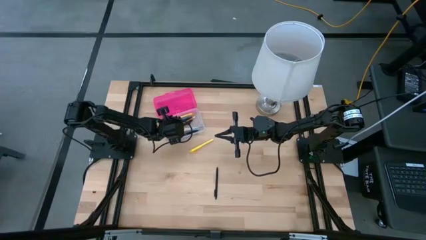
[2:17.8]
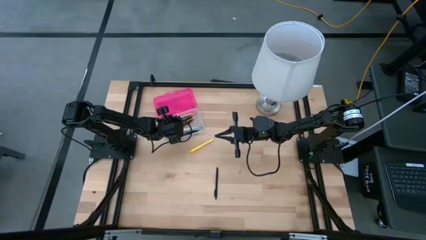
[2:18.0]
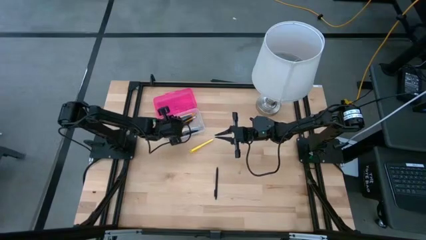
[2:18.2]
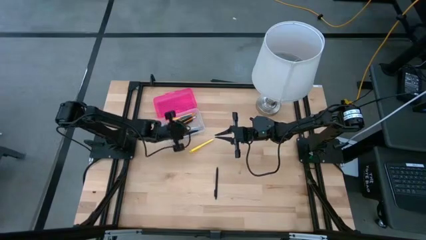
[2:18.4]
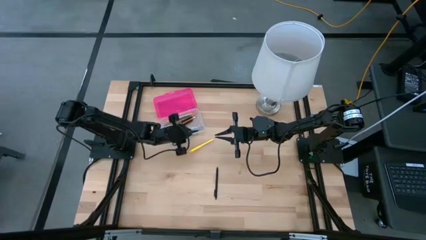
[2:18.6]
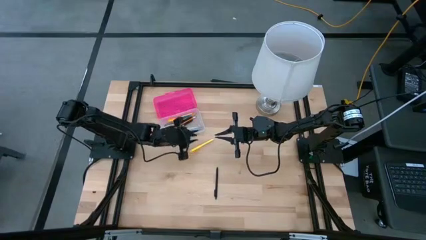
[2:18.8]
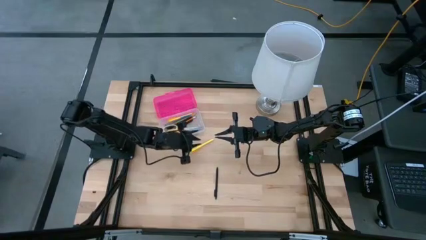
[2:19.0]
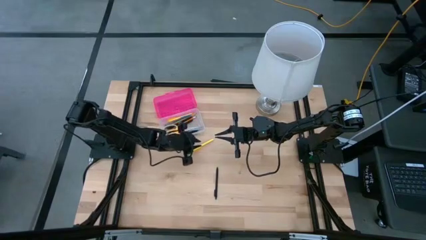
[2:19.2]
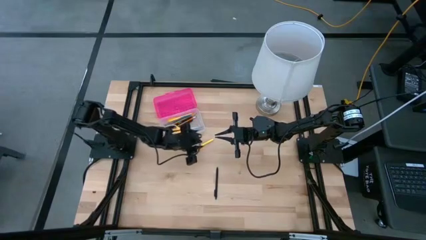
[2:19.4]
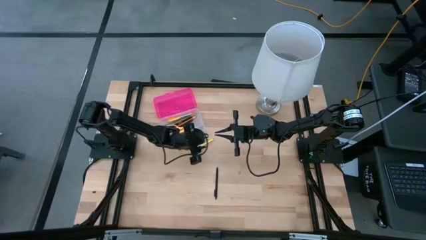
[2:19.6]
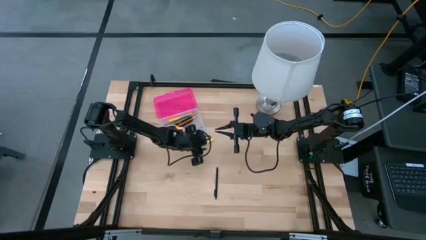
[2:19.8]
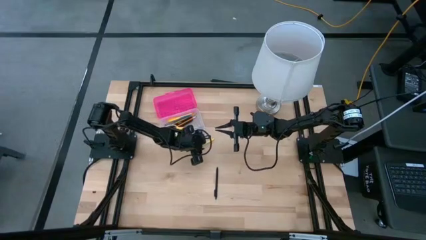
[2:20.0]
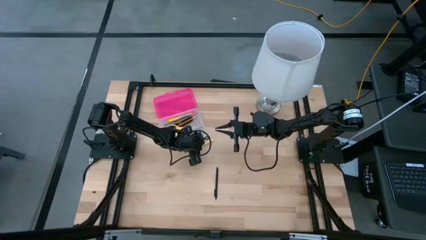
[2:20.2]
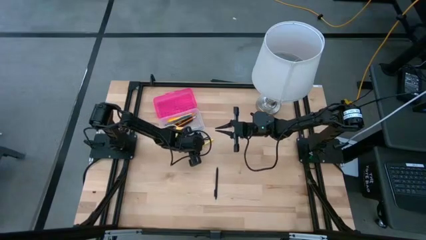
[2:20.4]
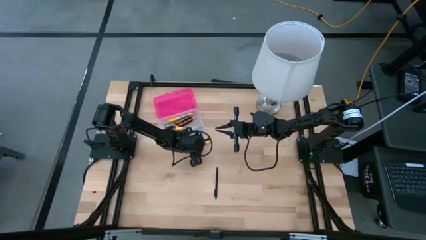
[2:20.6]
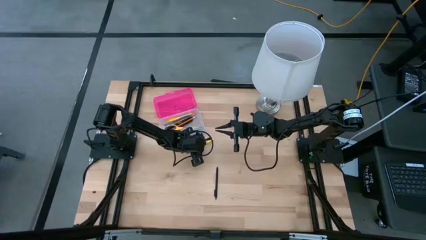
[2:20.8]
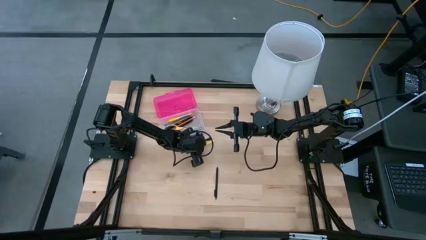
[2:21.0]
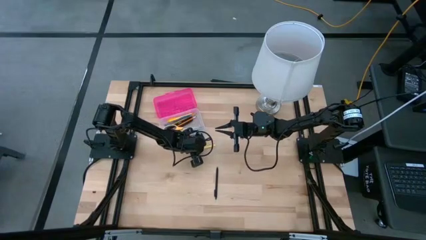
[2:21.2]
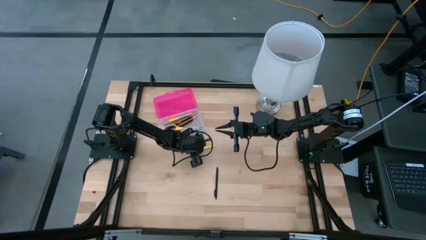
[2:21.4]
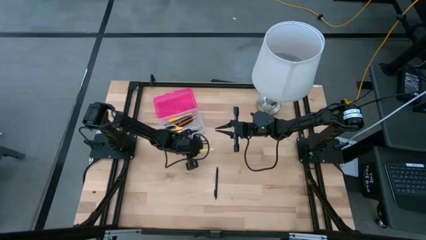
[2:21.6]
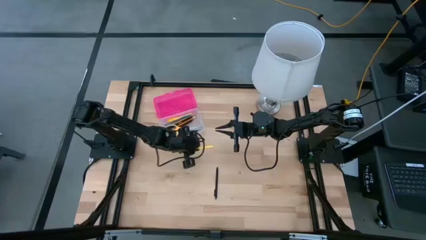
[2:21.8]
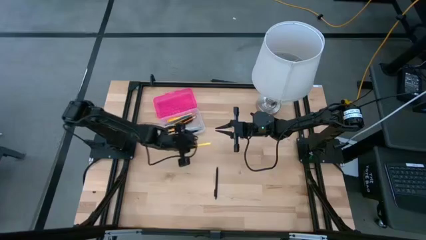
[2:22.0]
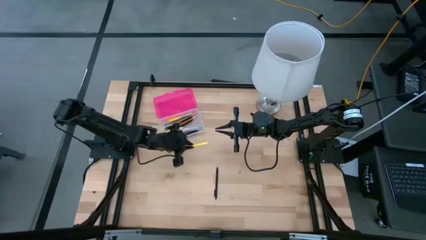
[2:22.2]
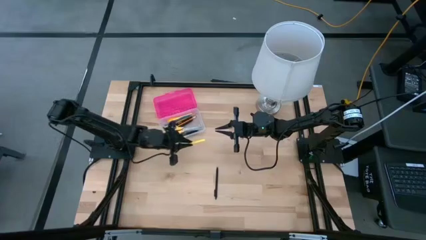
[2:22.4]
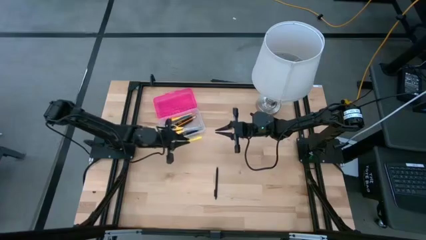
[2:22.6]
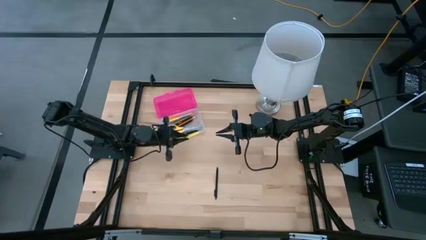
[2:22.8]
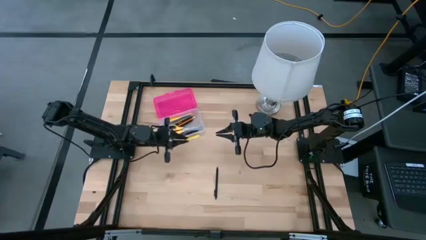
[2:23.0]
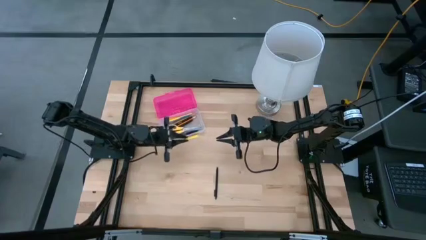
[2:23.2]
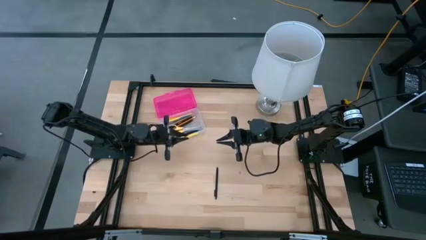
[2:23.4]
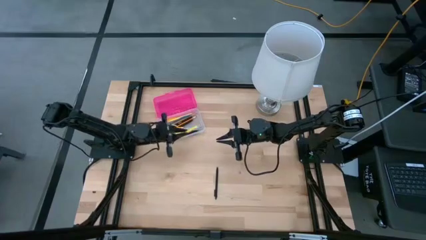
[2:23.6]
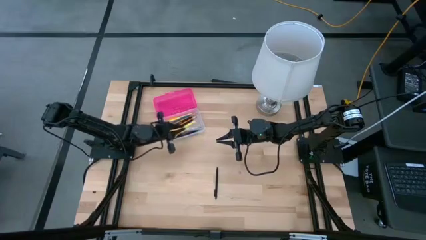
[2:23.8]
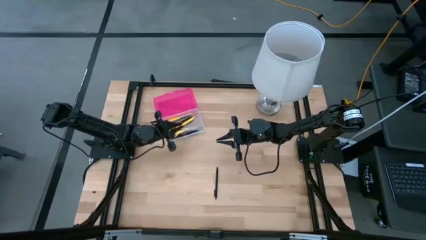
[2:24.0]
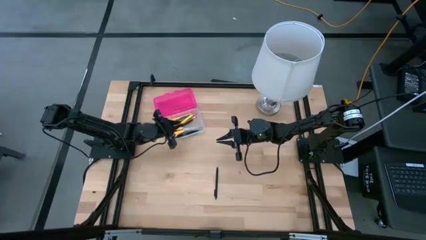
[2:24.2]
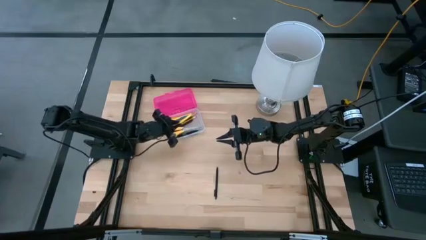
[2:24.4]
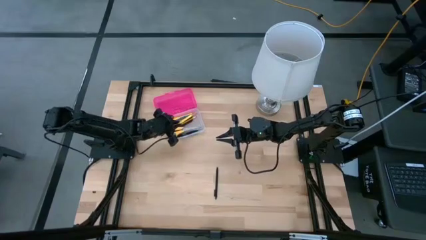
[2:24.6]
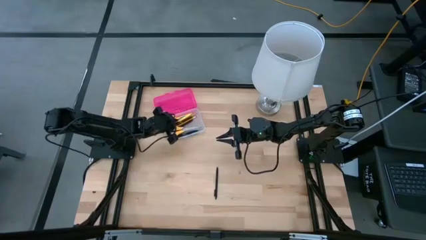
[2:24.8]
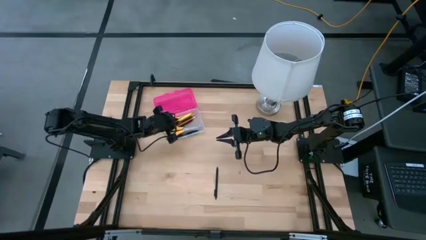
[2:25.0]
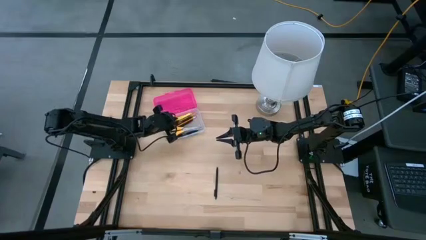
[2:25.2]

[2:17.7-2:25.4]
Task: Pick & place school supplies into a supply box
Put the yellow pen into the pink supply box

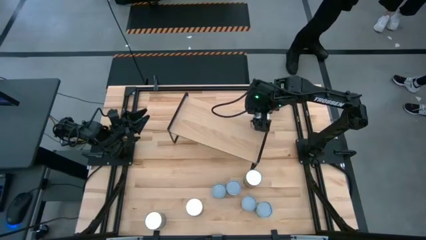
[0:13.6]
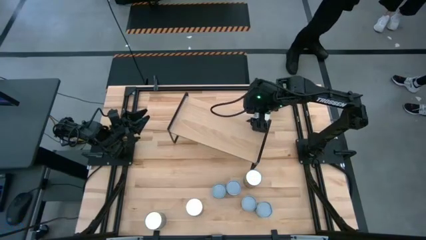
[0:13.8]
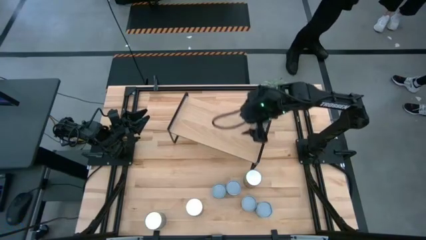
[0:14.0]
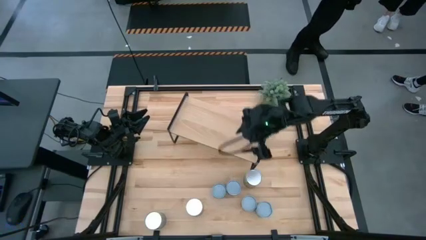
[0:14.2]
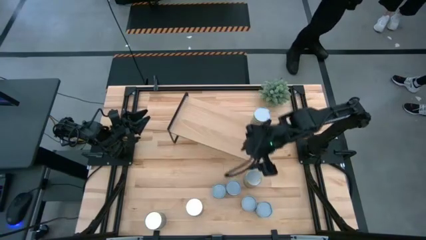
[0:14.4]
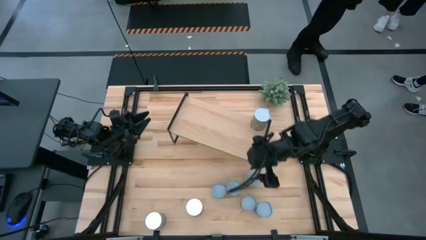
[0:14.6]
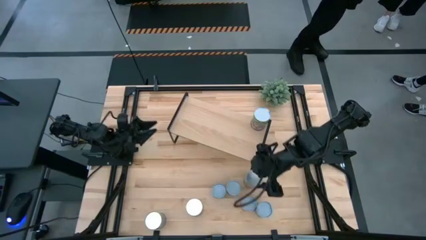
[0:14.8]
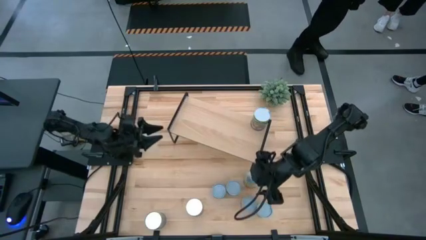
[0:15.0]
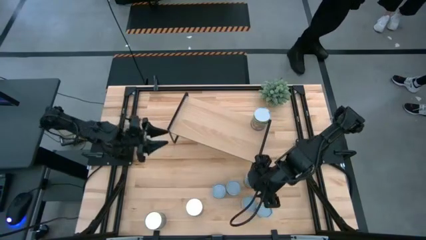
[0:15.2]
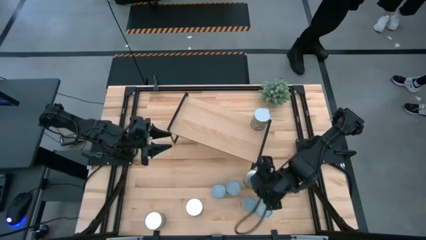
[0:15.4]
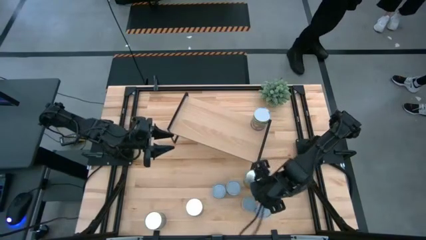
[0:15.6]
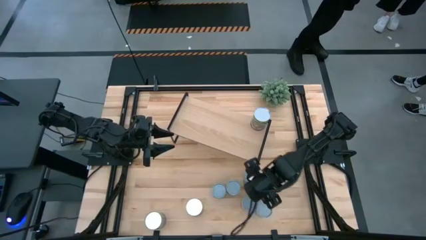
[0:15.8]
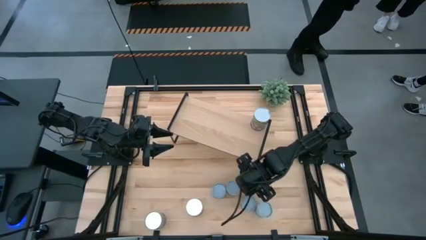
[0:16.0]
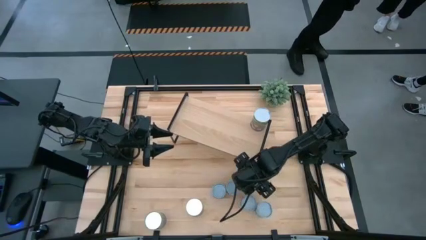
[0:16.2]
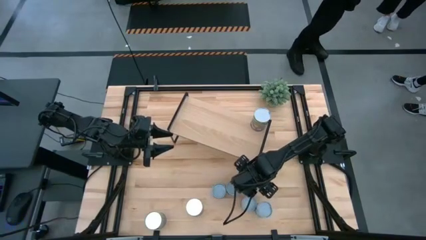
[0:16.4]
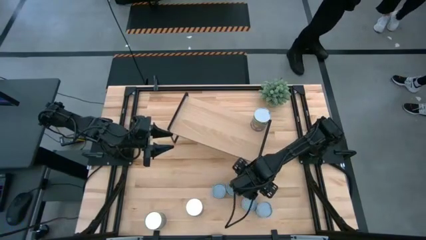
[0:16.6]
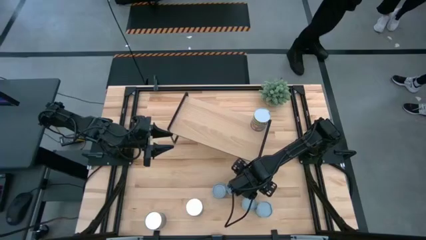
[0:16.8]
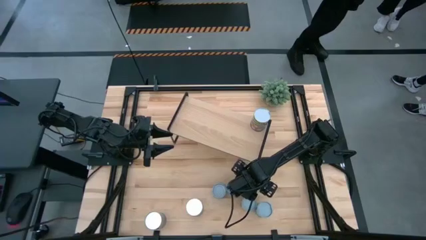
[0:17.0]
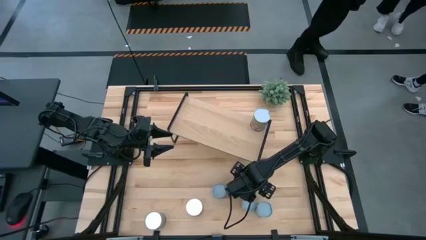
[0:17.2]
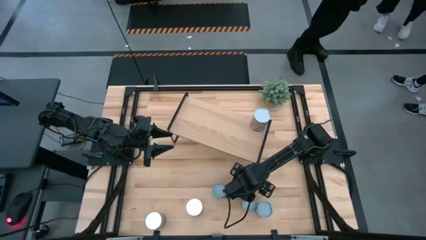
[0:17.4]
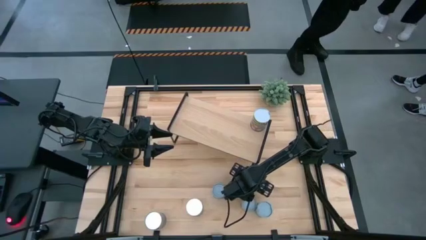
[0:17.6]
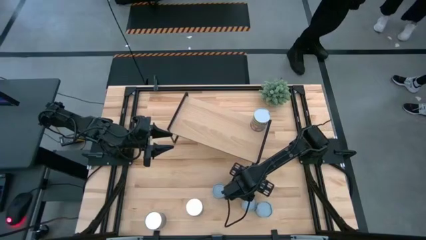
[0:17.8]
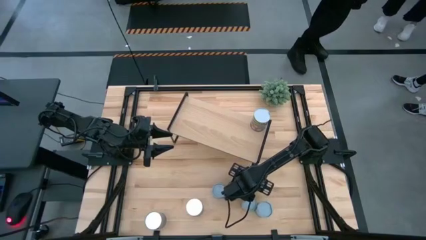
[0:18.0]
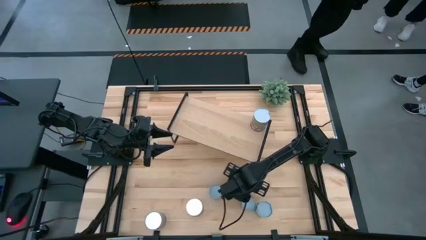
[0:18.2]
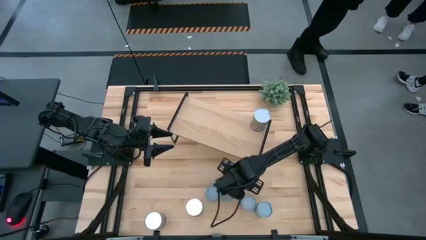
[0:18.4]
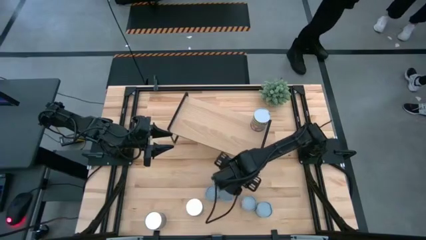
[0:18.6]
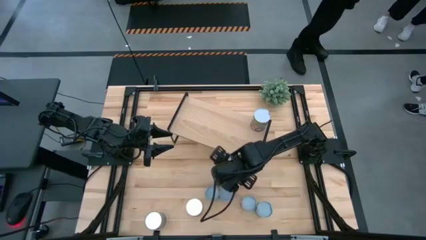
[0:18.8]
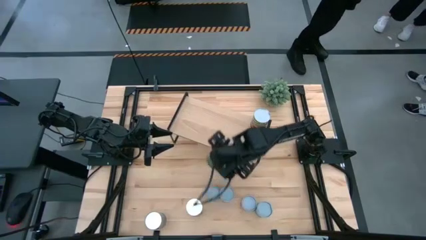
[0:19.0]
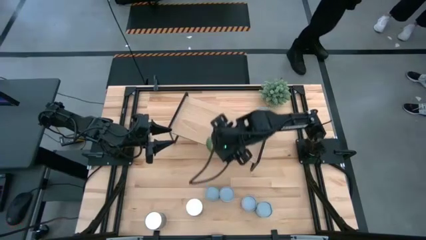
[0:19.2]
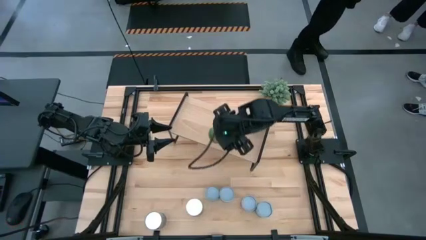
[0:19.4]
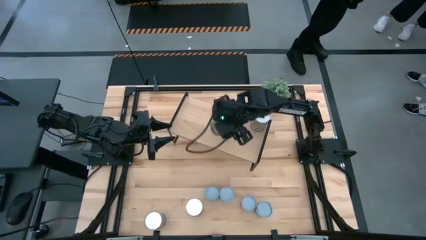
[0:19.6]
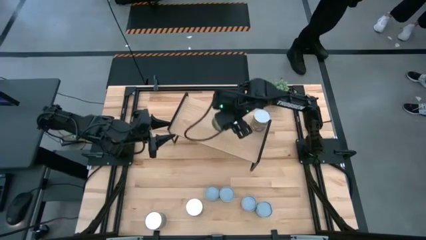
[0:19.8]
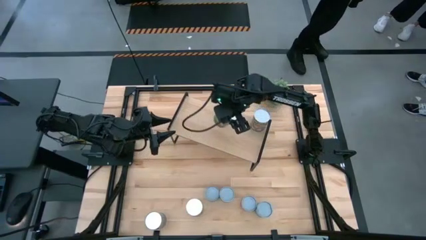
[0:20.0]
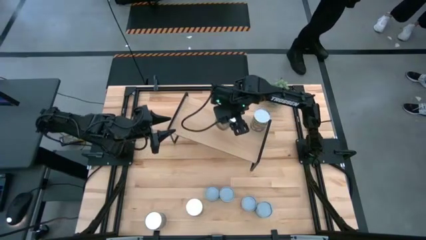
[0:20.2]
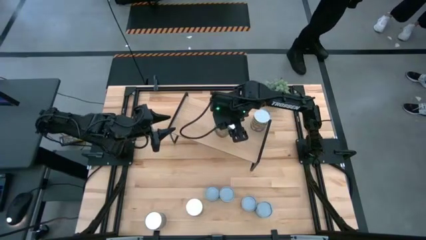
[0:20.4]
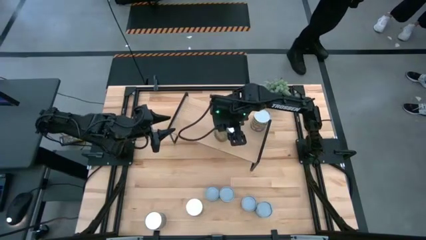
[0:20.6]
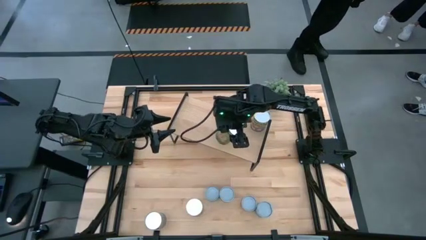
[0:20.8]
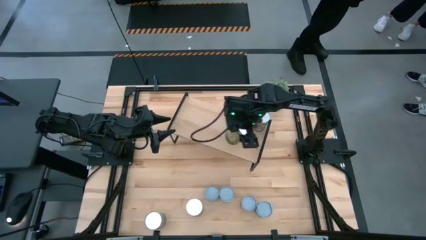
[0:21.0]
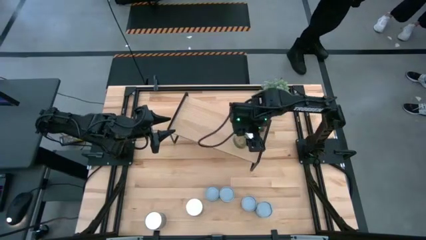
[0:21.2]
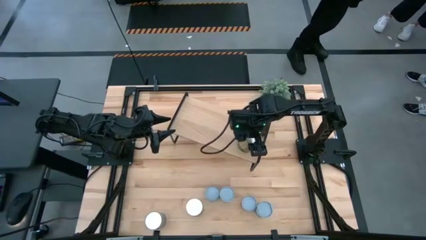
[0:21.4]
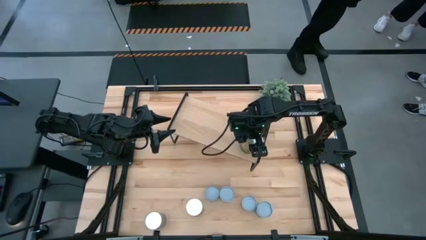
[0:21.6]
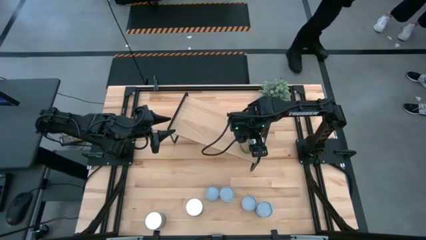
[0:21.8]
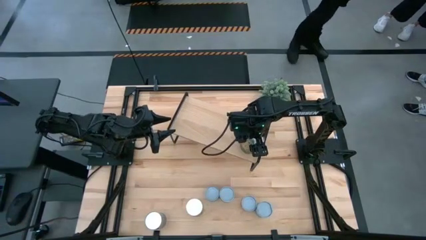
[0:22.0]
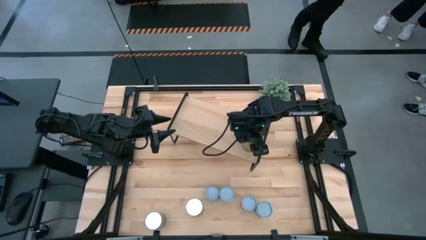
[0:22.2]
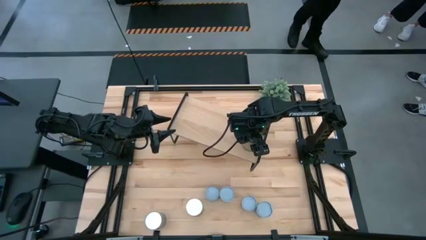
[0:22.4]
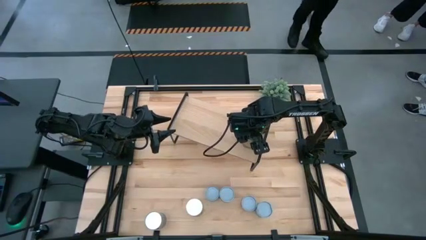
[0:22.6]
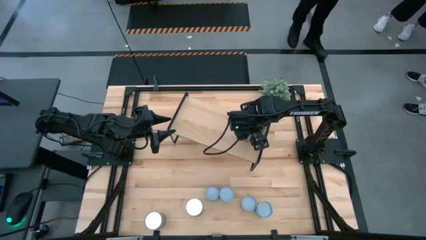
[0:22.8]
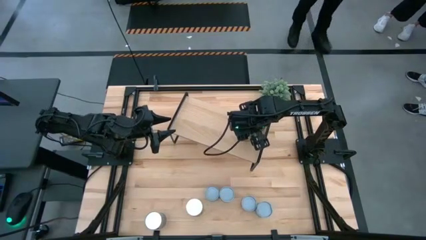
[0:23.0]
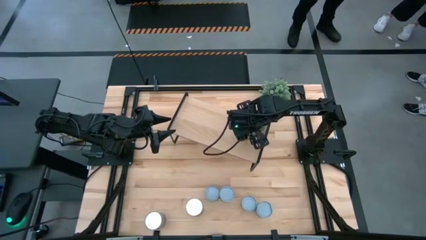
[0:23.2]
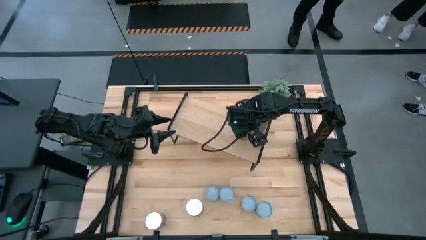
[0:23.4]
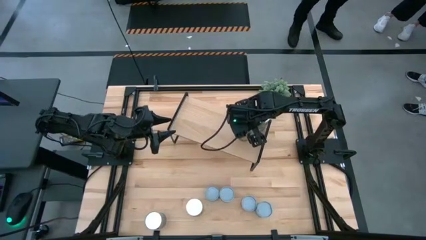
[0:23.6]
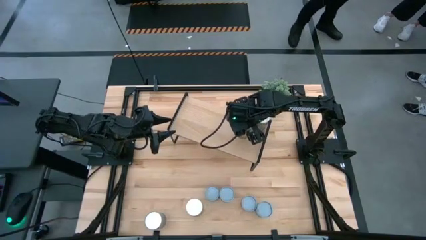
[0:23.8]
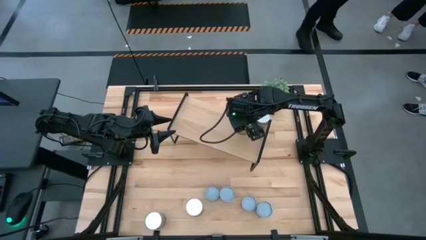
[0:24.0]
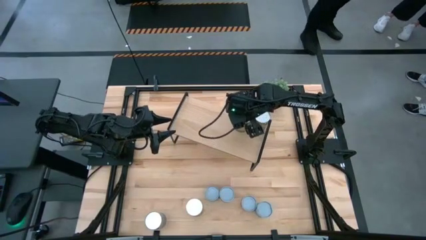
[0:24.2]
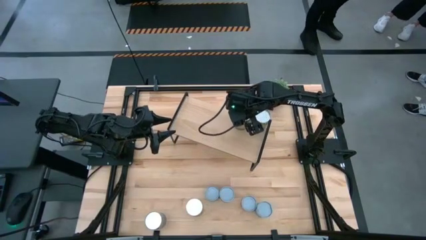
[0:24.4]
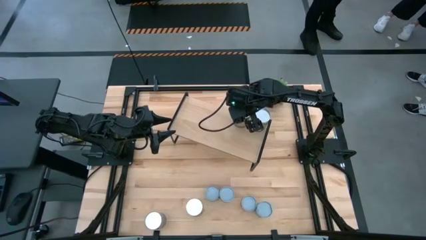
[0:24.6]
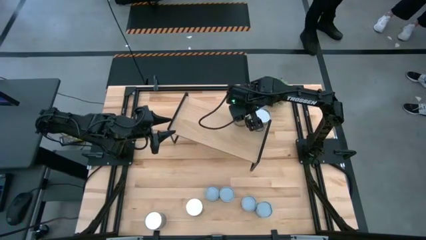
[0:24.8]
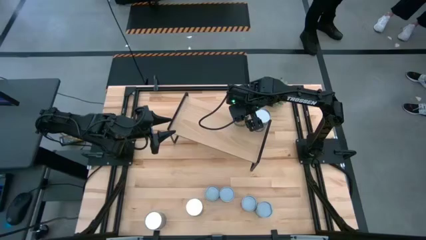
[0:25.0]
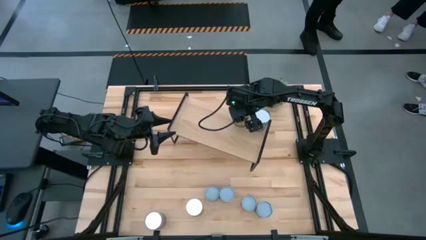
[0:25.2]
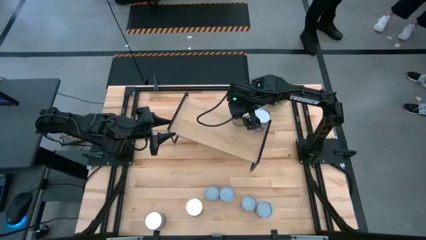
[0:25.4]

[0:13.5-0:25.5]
Task: Pick and place cans onto a shelf
Put the canned oranges on the shelf
